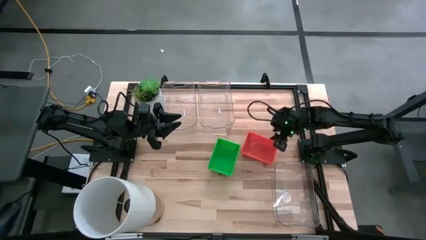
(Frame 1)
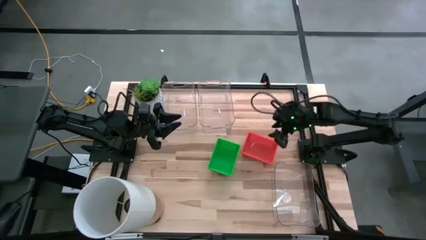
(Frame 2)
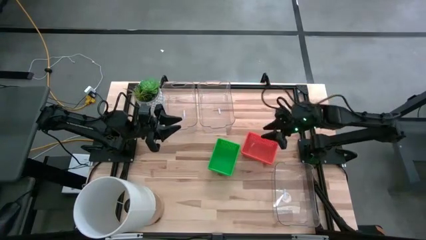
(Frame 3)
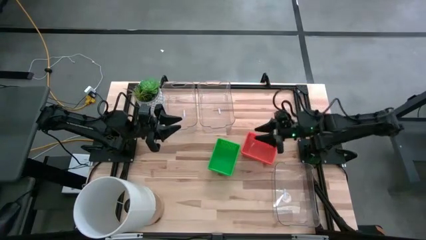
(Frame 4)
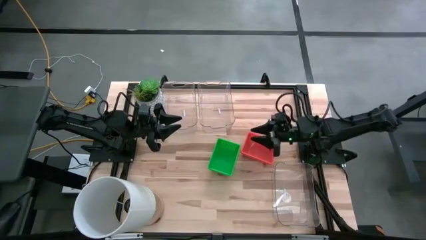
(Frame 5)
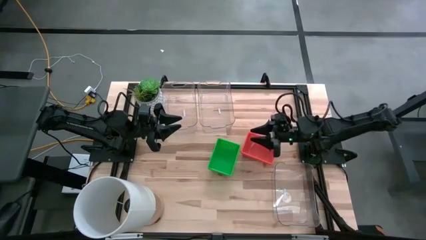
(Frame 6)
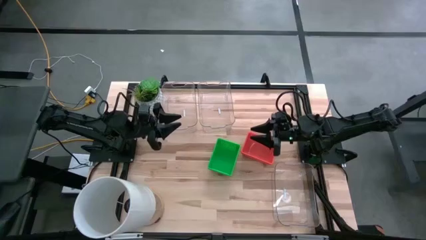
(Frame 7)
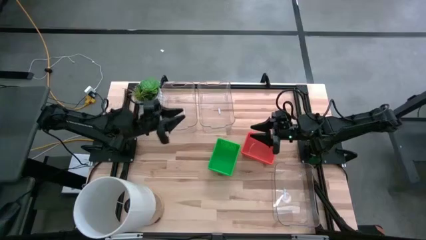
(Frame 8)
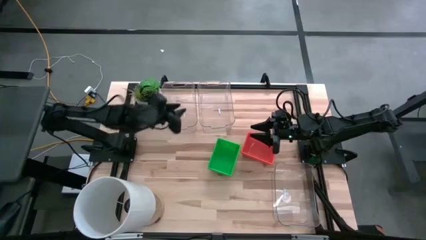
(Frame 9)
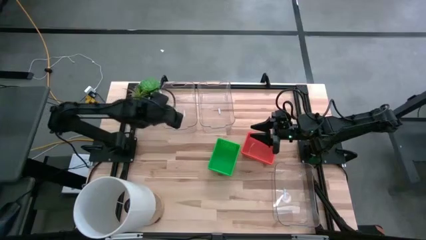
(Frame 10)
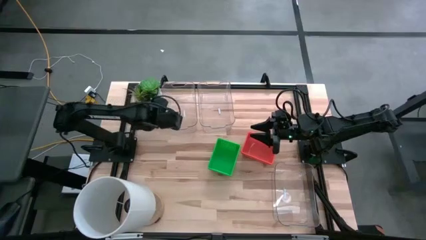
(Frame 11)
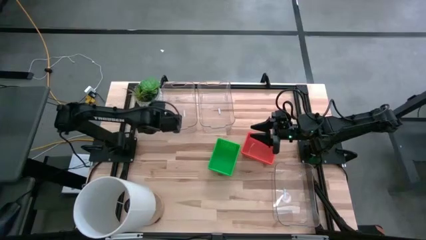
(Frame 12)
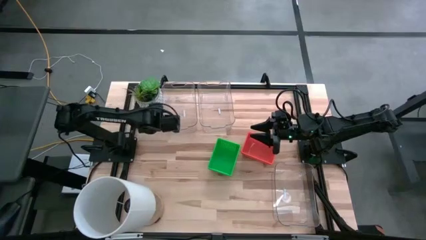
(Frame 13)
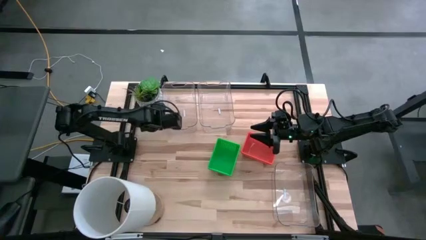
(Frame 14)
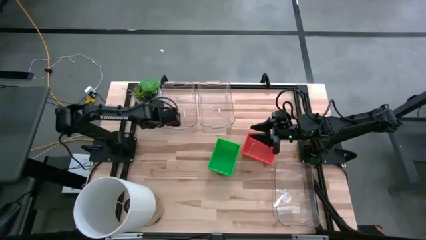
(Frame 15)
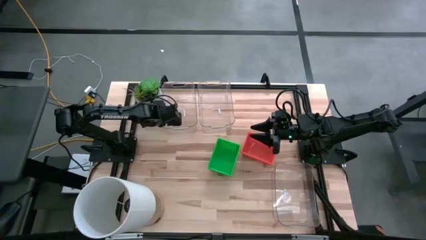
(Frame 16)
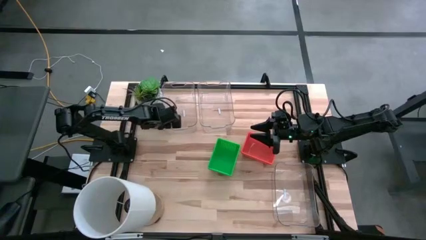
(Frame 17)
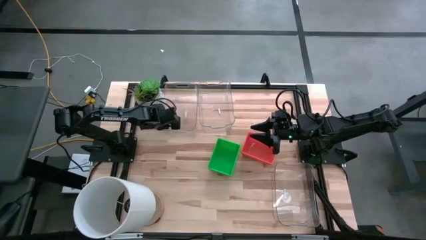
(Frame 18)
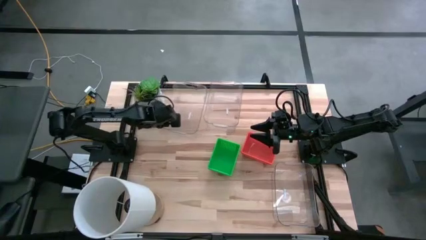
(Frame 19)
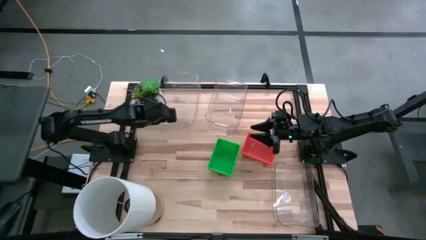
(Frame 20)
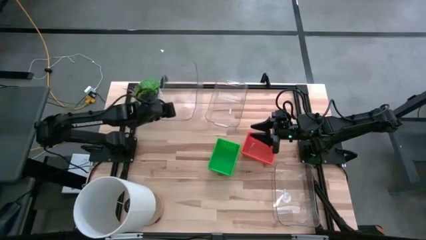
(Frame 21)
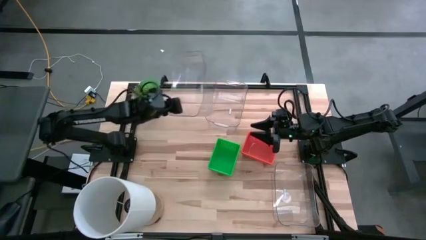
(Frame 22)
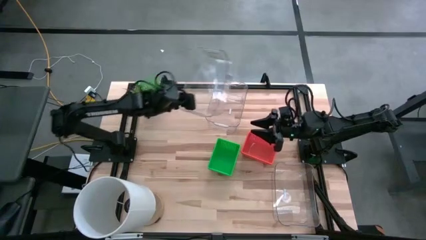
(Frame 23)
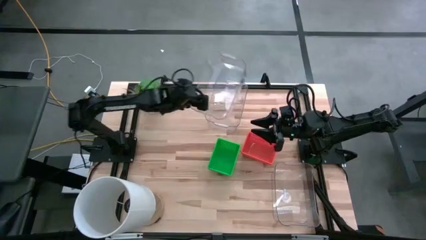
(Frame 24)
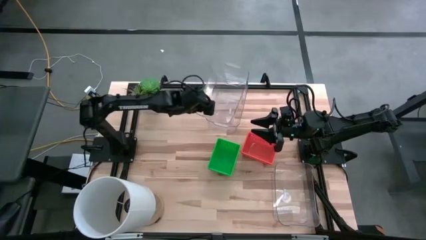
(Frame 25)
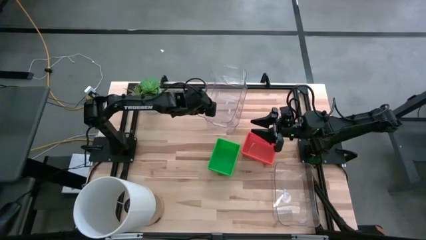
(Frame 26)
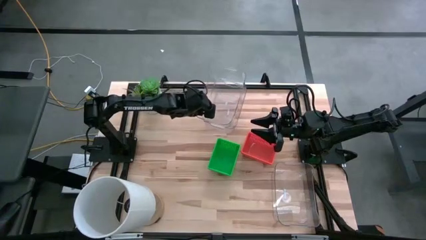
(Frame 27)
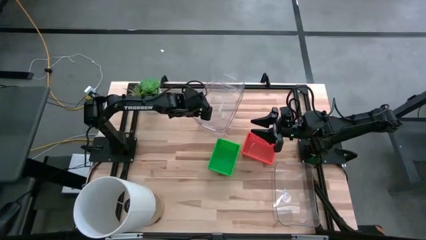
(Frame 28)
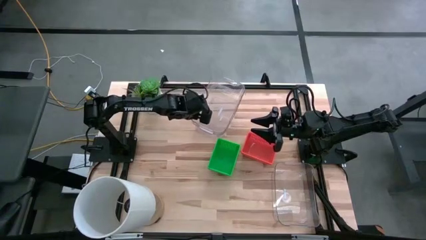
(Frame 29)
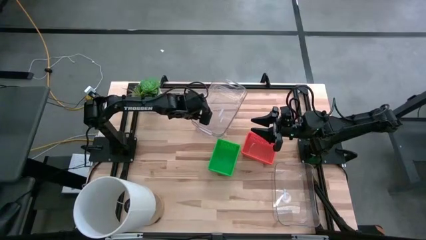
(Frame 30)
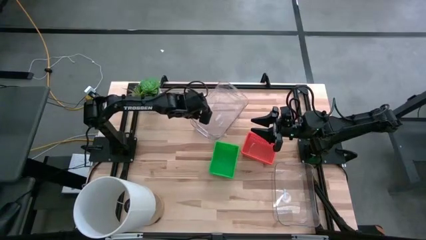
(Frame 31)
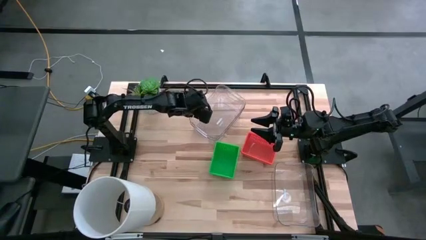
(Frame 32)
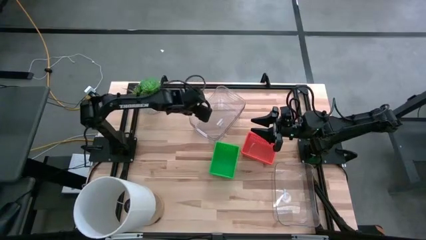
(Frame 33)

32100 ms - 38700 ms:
Stack the top left transparent bin on the top right transparent bin

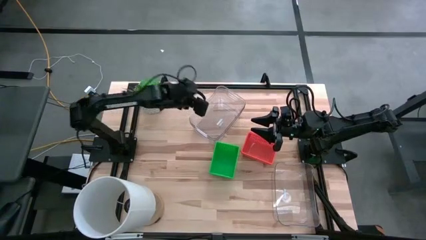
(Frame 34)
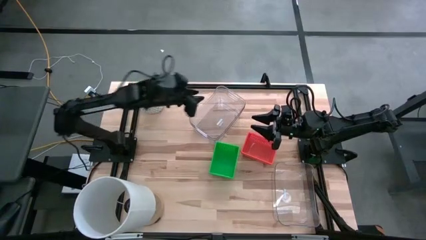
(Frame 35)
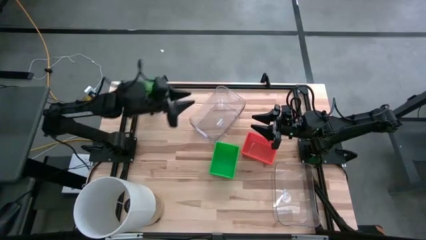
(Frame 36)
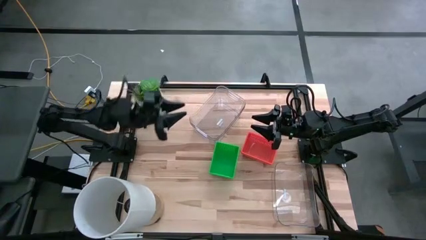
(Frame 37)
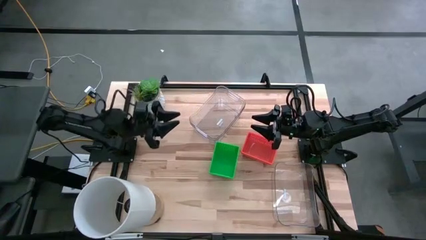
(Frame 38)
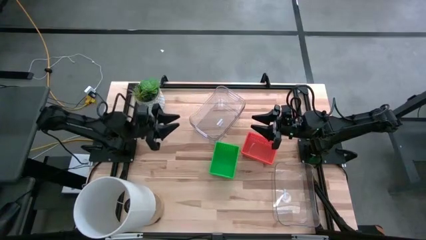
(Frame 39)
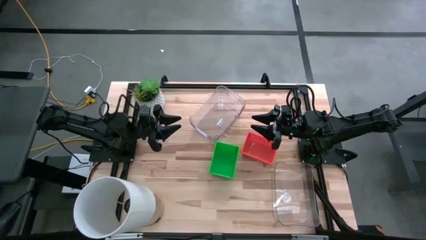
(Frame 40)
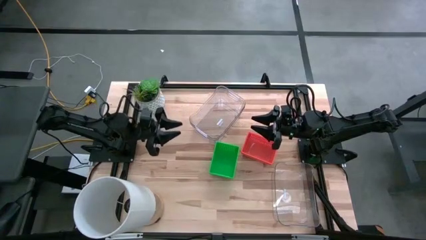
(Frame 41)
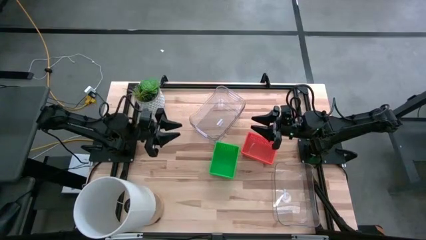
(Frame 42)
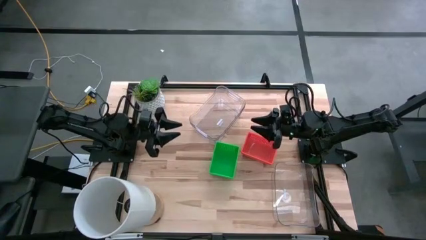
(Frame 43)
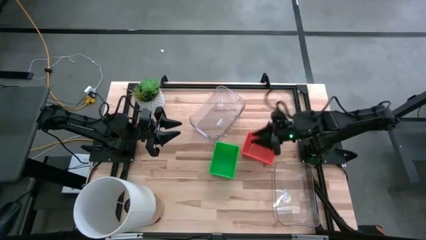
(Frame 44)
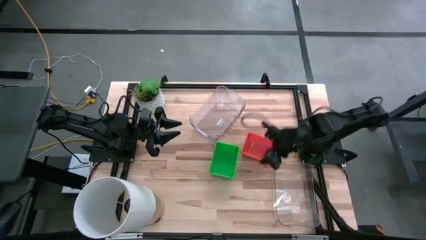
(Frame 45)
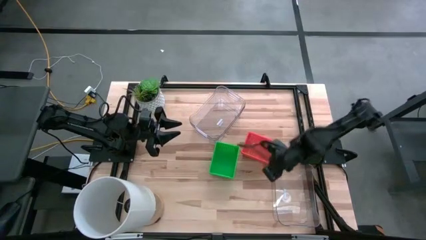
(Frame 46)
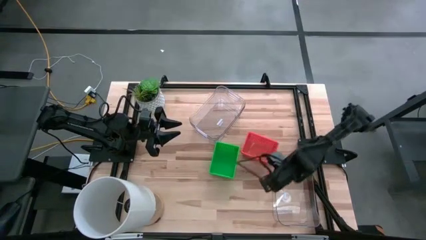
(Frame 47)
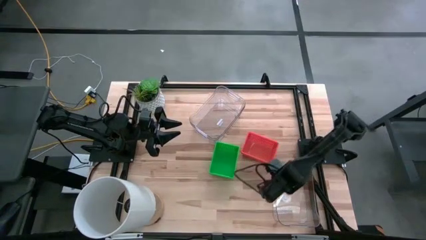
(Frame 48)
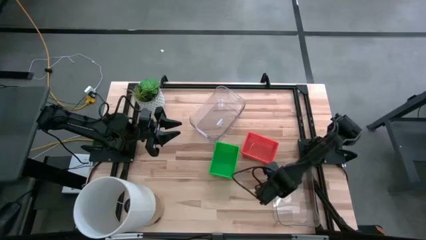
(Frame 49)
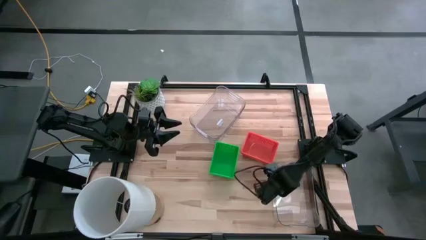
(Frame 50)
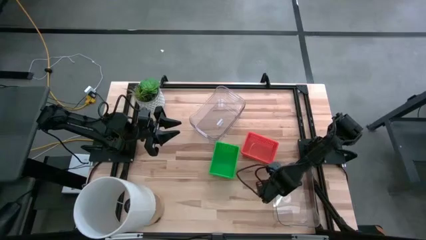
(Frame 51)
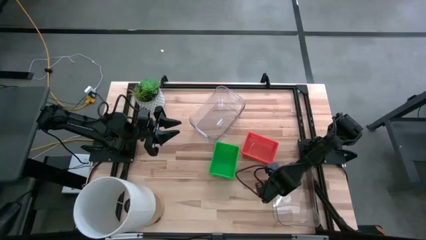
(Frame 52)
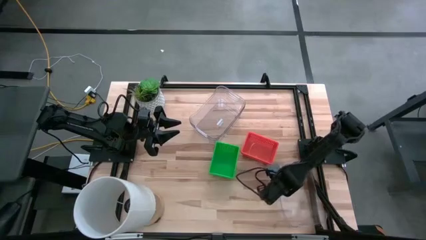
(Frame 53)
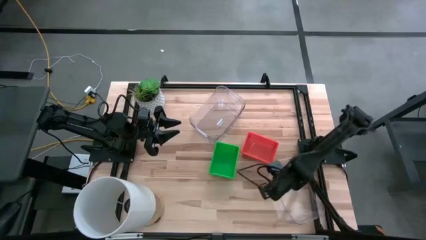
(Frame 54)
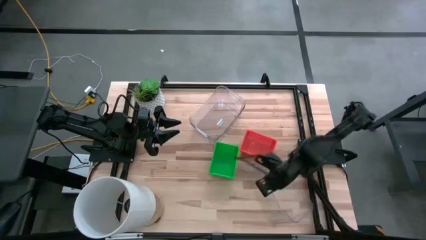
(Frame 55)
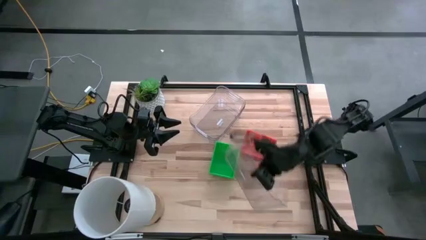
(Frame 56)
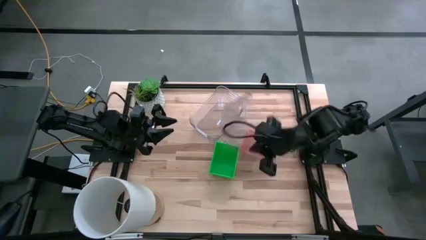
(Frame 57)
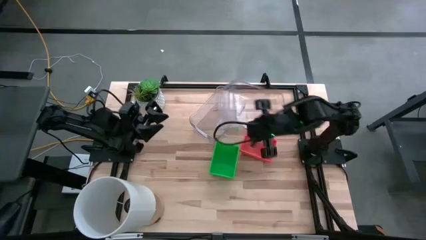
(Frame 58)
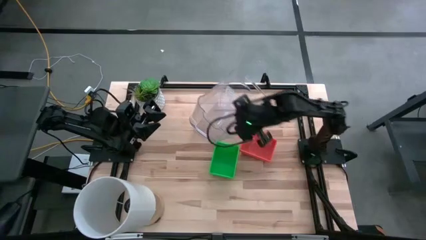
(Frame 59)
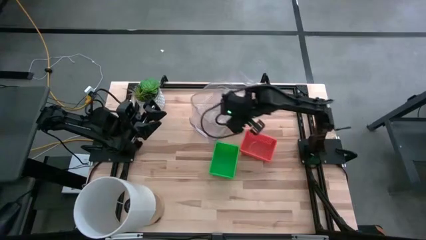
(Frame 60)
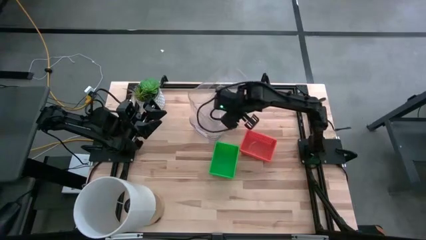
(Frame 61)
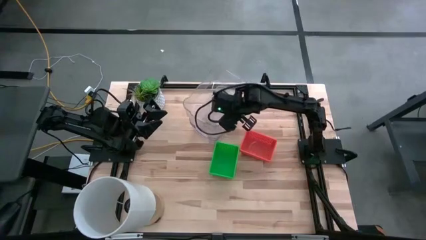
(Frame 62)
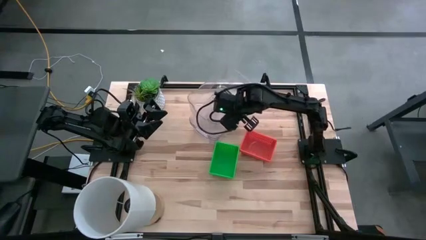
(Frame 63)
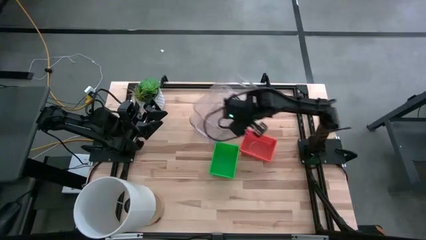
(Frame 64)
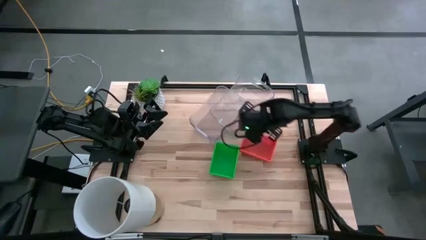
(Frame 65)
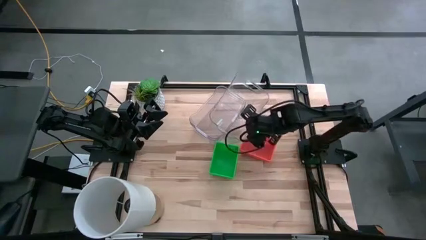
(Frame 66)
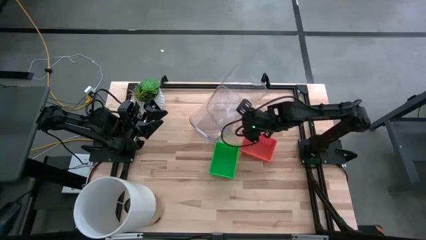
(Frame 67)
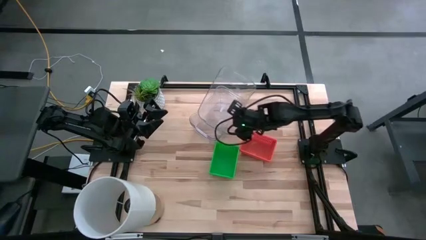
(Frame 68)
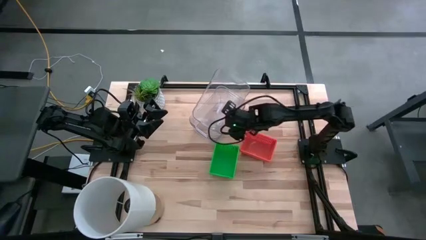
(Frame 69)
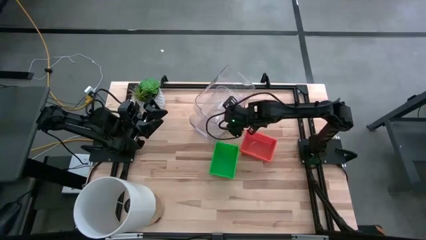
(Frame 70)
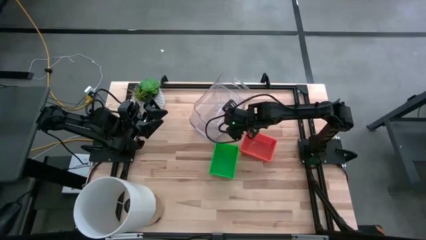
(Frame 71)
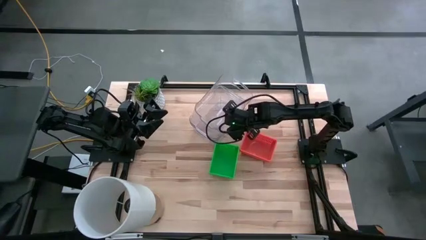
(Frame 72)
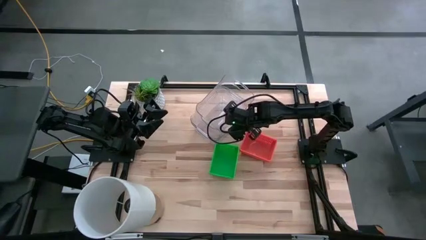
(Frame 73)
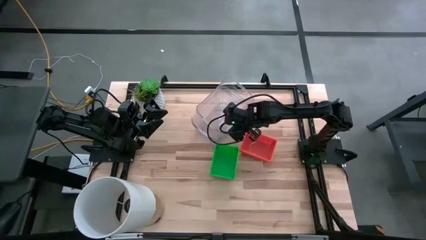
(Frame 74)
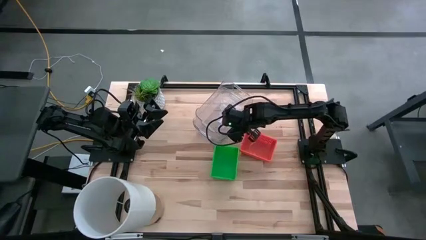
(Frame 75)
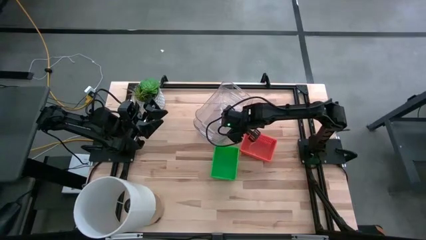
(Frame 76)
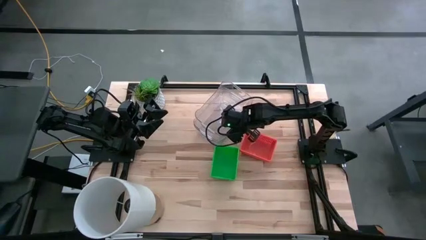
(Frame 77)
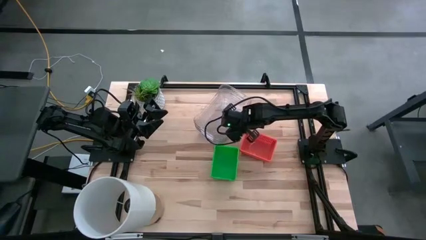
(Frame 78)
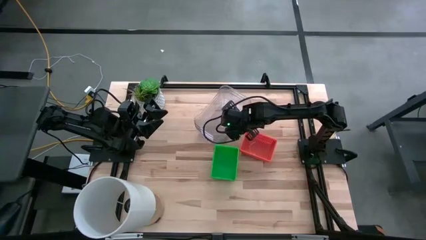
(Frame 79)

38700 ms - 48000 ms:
Stack the bottom transparent bin on the top transparent bin
